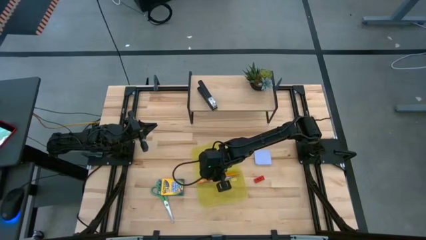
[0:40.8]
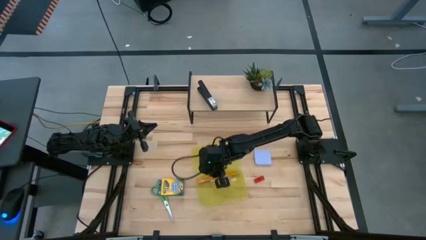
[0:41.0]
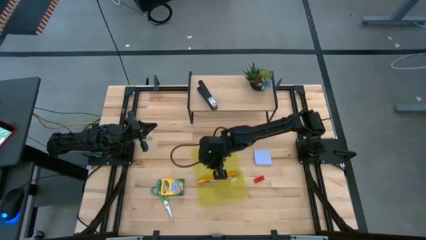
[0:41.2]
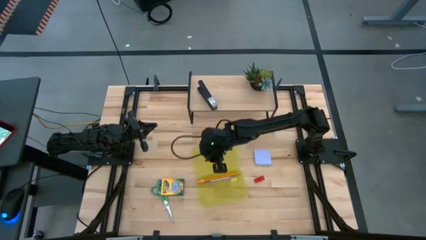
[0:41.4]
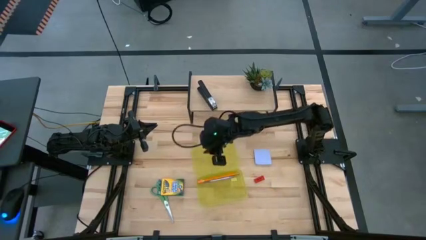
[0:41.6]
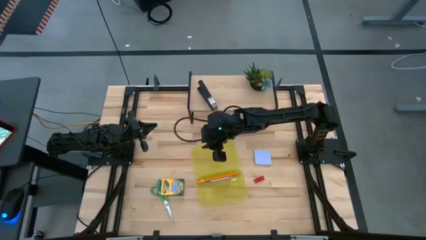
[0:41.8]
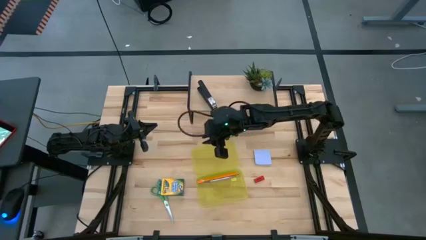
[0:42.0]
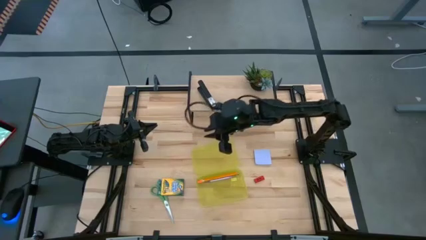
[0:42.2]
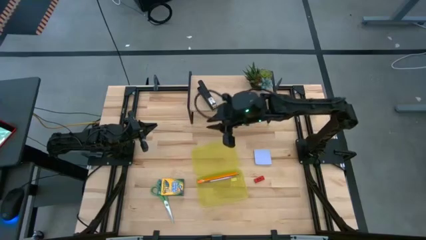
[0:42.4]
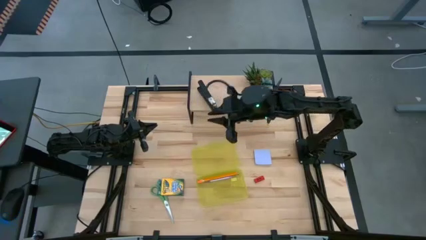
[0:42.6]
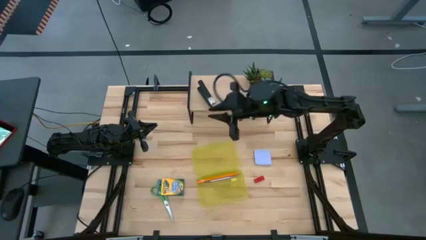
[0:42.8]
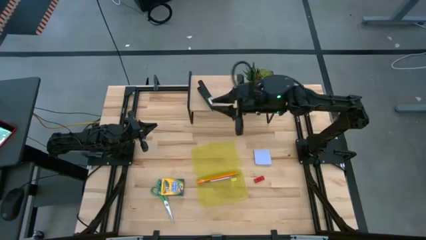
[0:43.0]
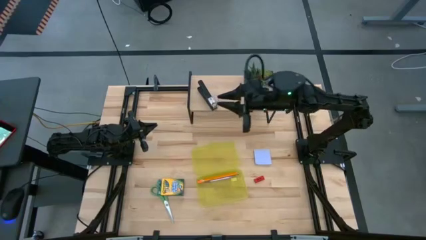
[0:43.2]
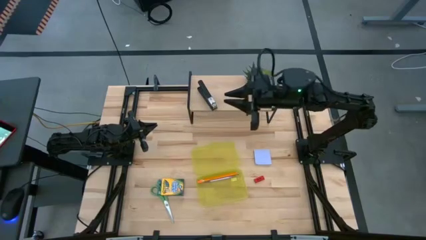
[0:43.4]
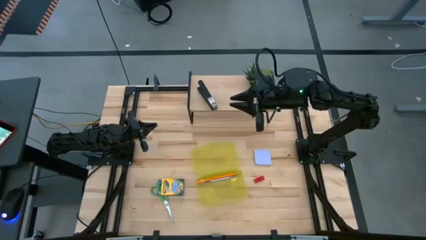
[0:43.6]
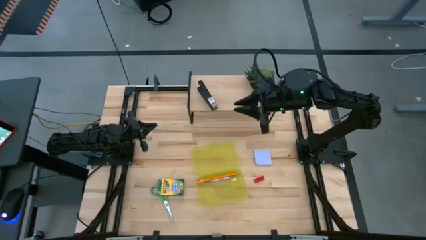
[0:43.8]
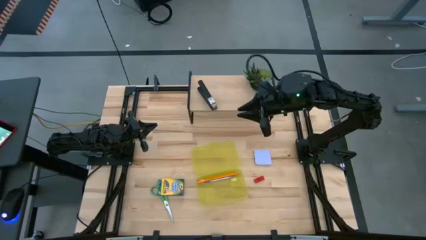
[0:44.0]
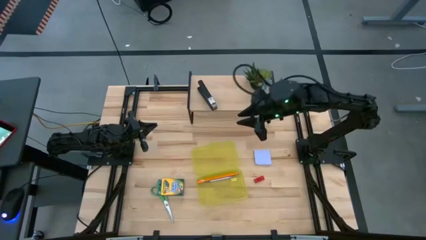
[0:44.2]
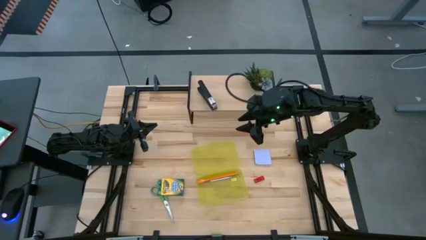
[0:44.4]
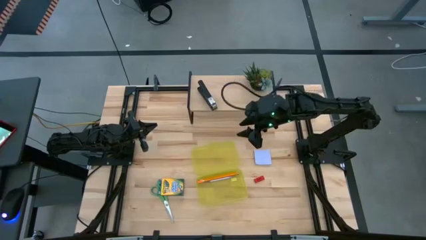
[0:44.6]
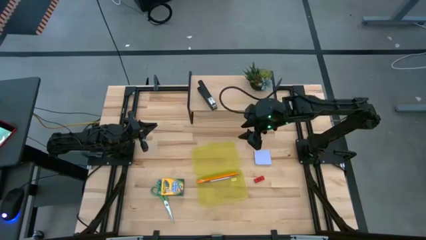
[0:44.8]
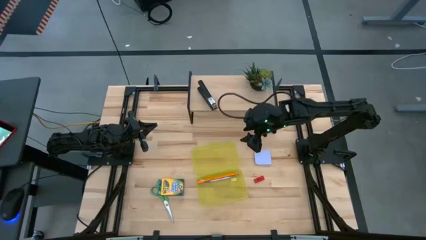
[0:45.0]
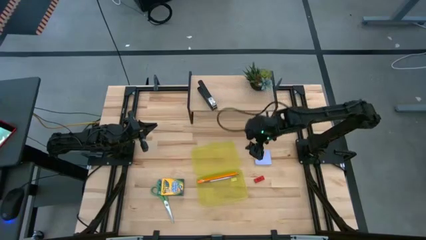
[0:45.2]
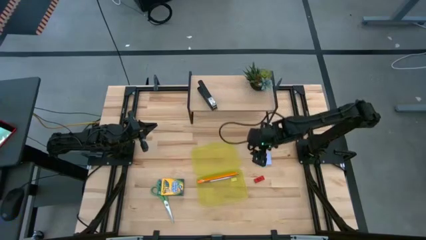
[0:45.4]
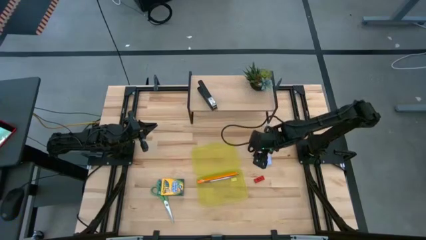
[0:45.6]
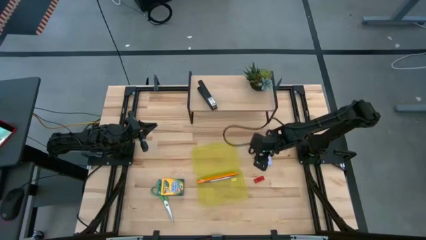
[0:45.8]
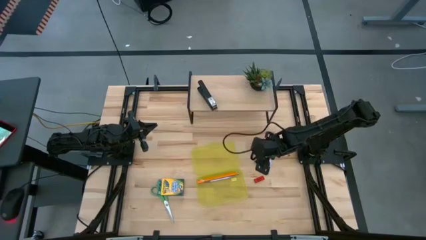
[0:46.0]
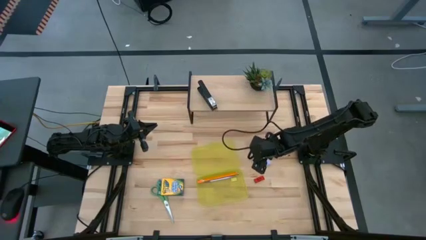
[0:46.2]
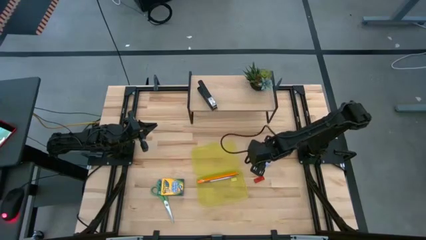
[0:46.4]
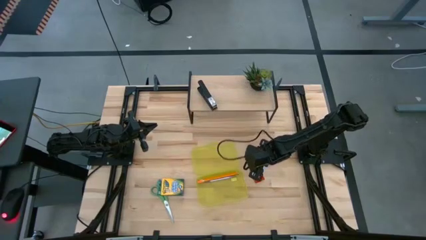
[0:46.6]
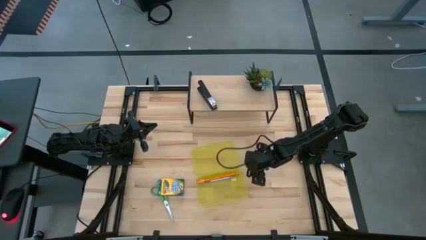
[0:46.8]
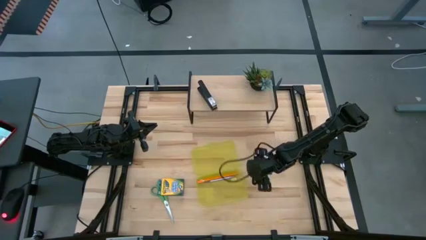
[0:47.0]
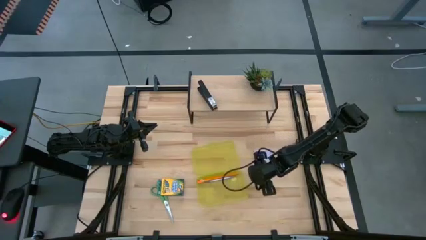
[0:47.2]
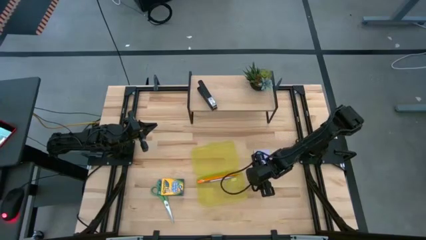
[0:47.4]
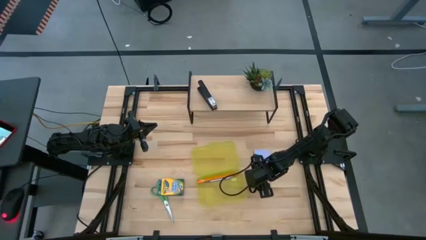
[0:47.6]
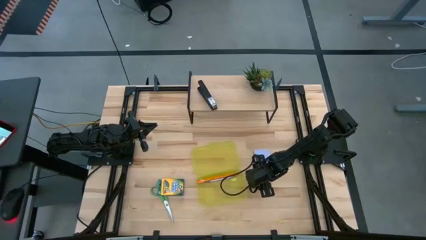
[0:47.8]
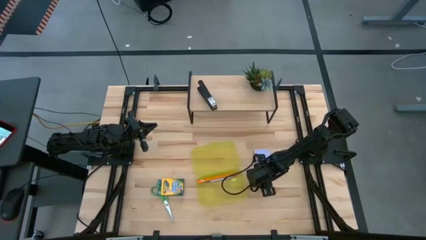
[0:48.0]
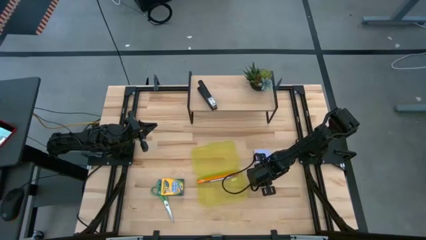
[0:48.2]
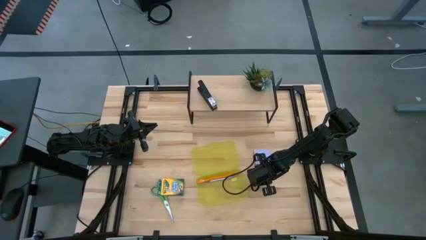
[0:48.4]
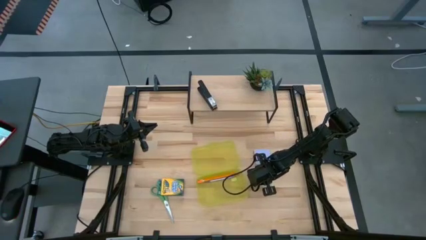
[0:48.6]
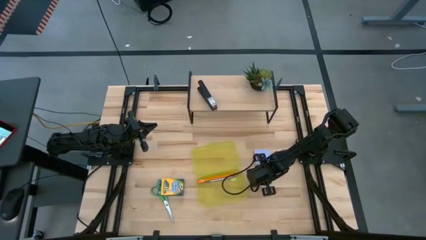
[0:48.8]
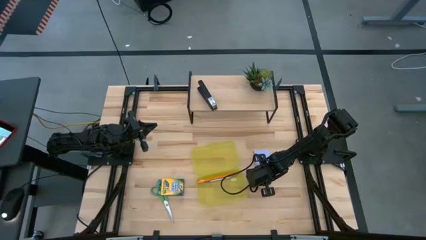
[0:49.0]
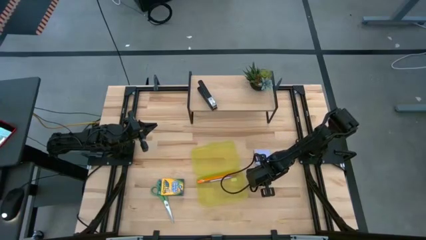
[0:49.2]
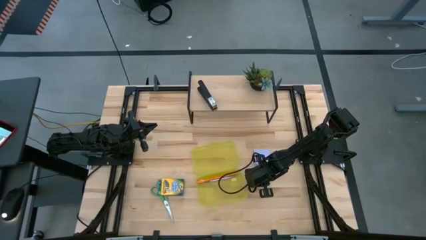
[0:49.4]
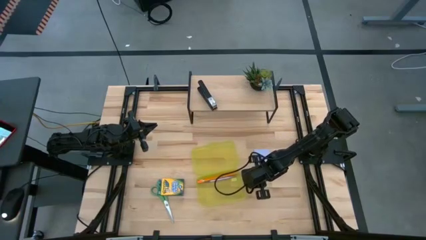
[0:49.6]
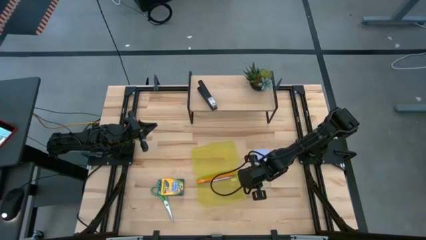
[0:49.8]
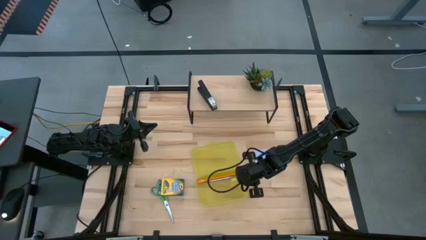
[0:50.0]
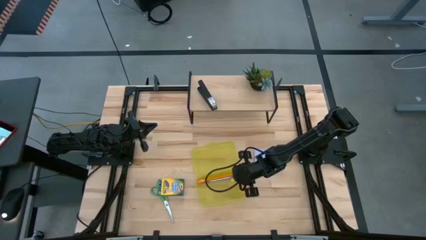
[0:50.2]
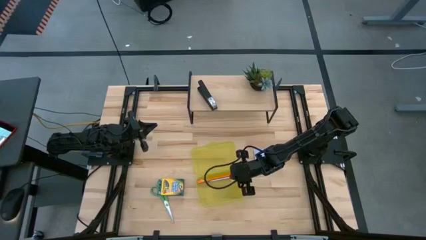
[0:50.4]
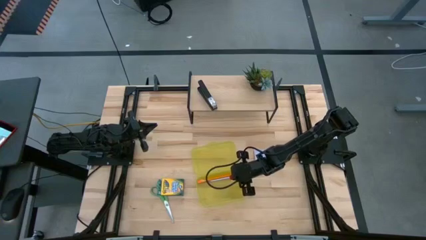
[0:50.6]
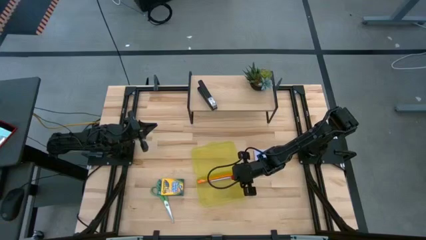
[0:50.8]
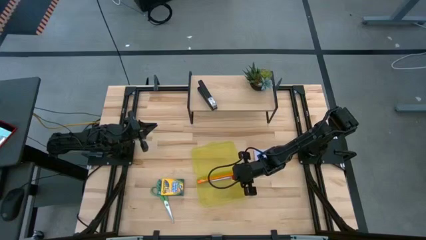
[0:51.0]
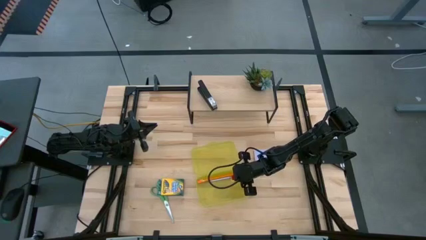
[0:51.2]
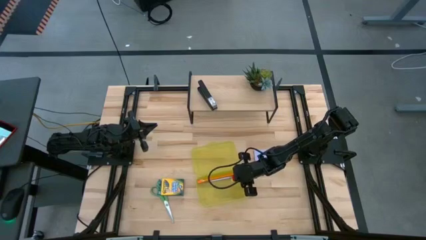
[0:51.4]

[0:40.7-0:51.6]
Task: Pack school essentials
Put the red eraser into the yellow supply box
